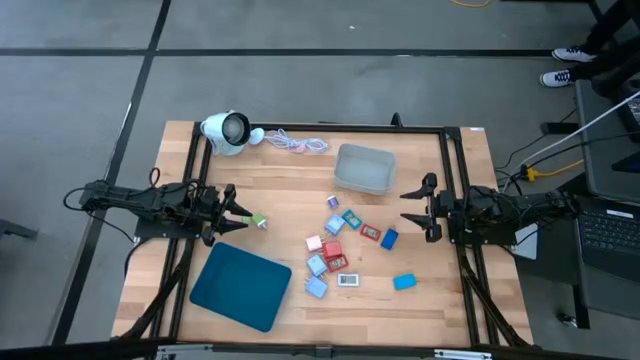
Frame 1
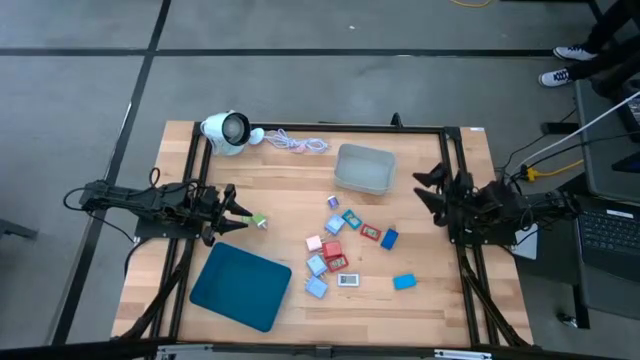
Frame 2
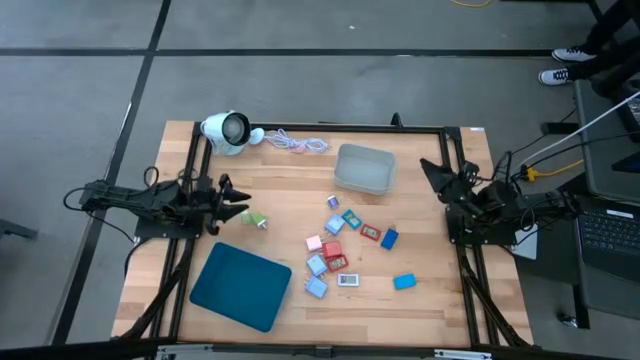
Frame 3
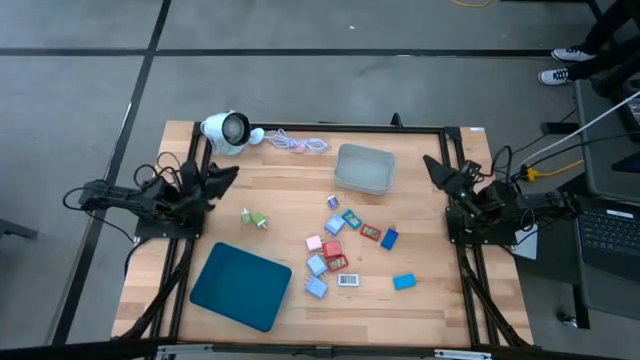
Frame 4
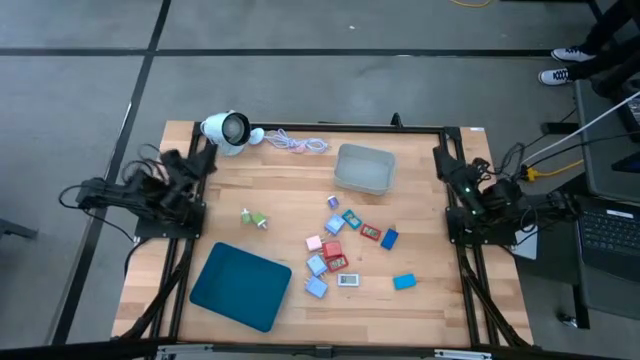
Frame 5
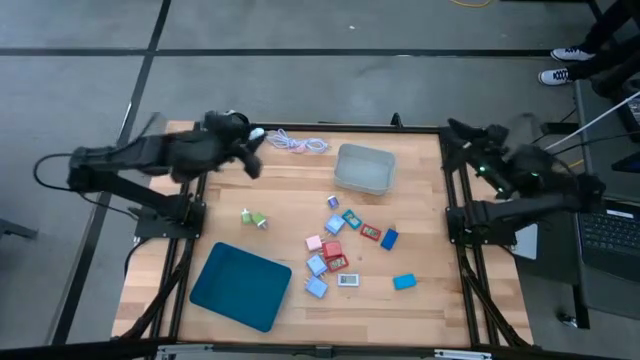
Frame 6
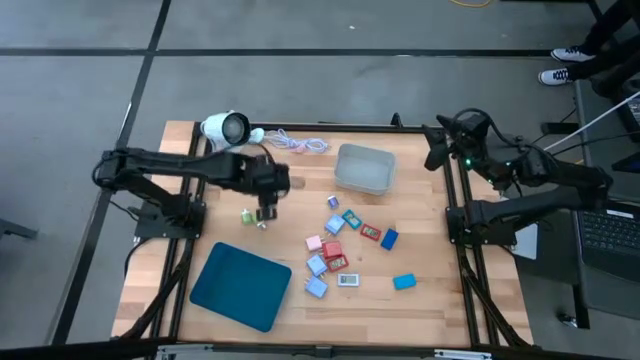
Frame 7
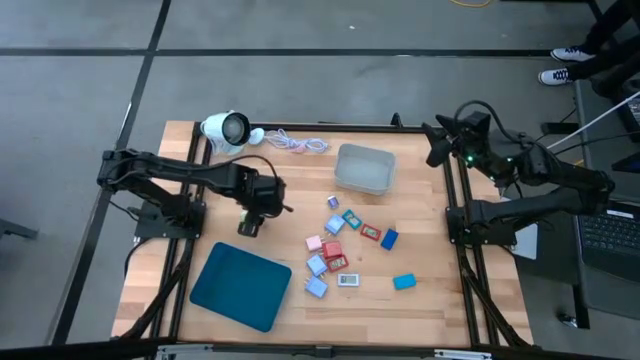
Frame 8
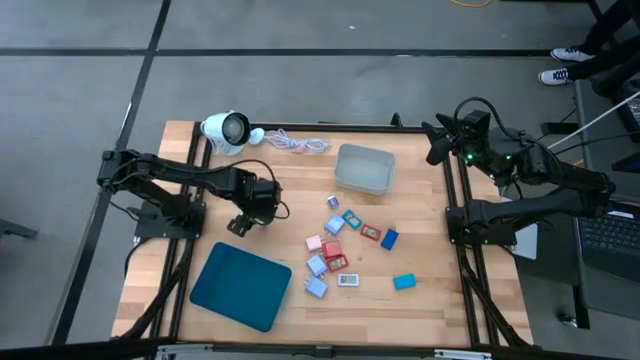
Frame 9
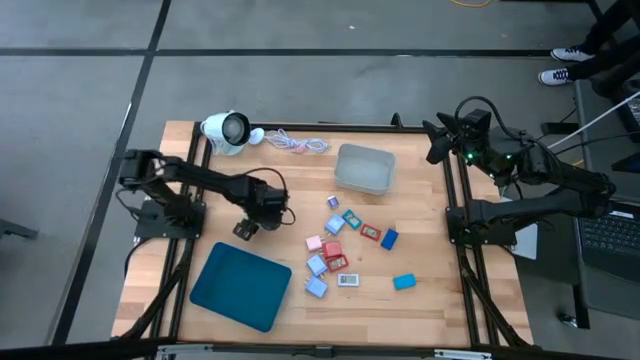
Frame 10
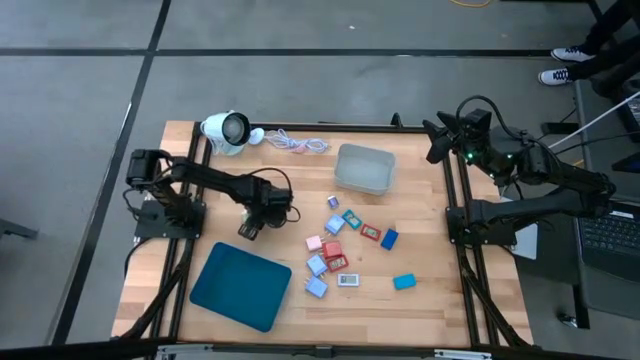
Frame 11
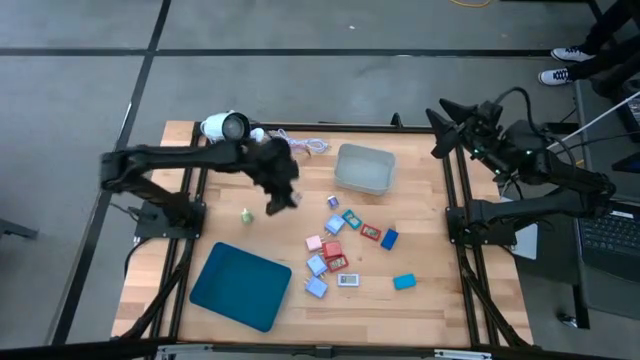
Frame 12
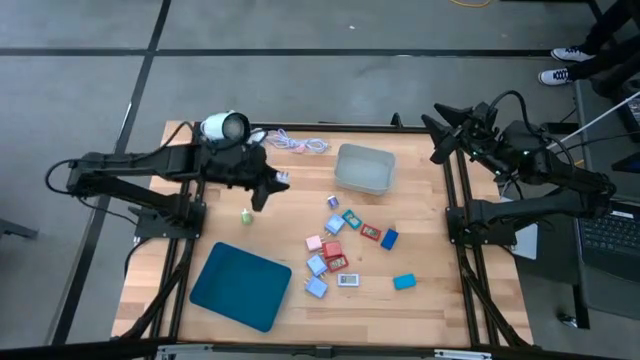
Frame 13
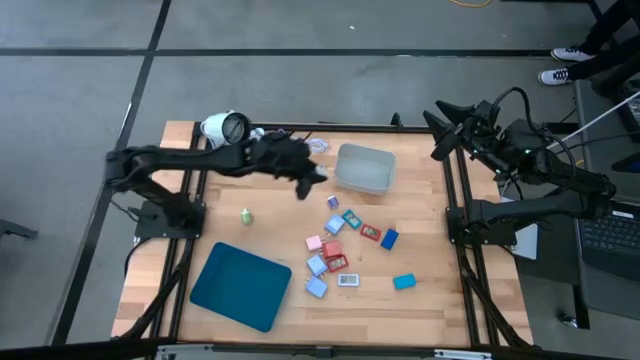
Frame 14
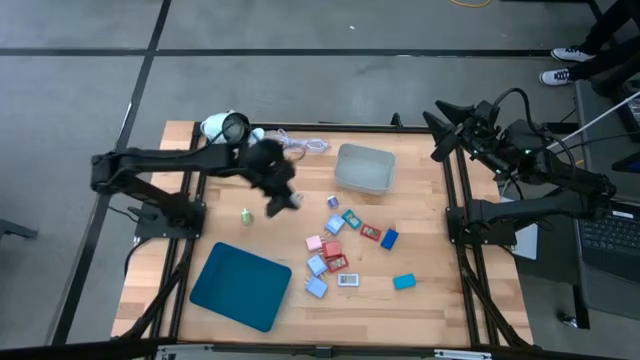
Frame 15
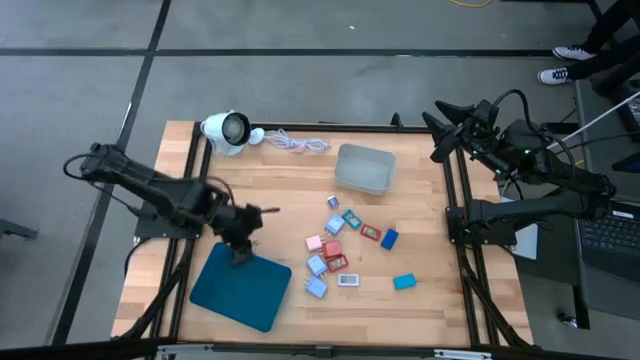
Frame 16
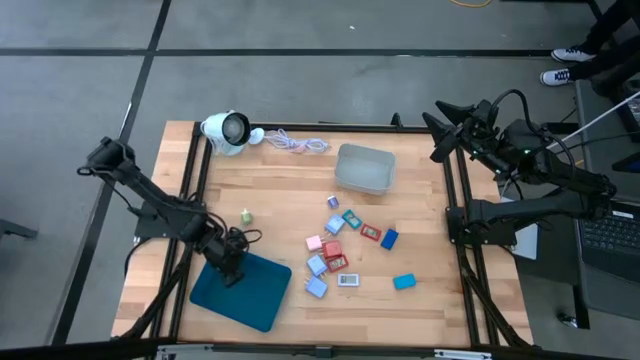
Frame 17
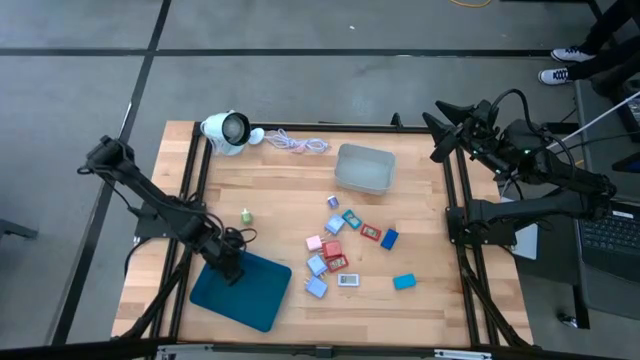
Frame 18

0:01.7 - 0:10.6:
Task: Pick & Place Office items
Put the right green charger adapter into the blue bin

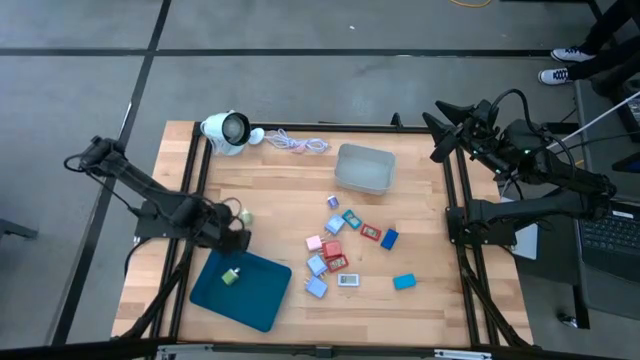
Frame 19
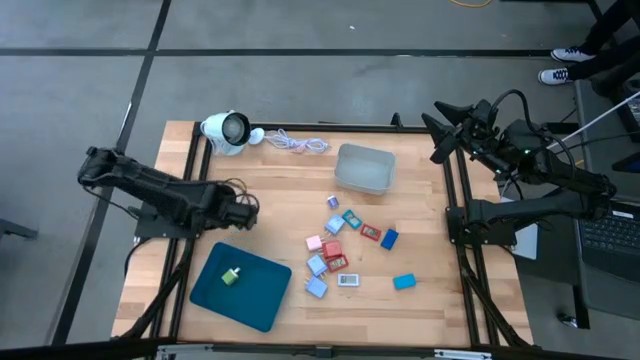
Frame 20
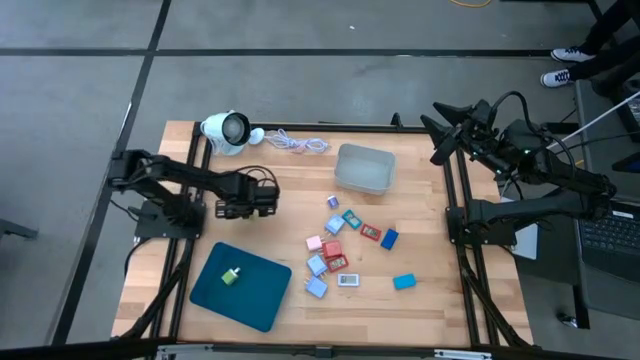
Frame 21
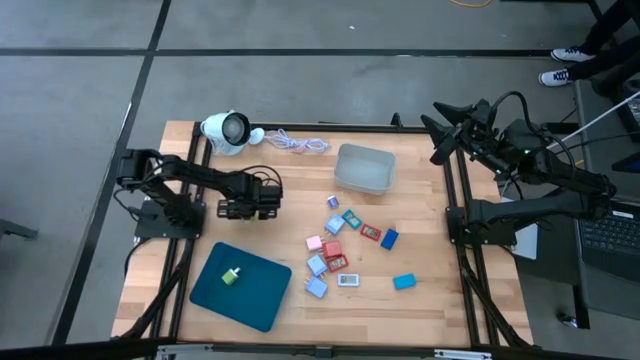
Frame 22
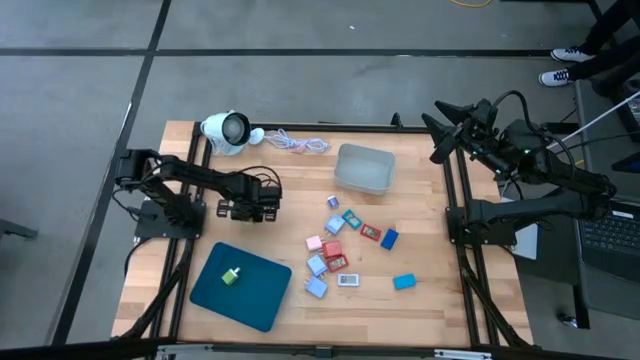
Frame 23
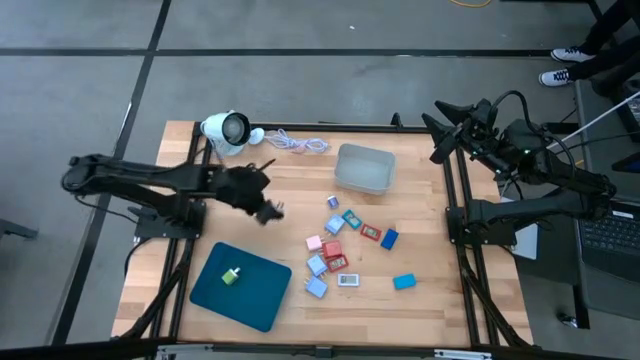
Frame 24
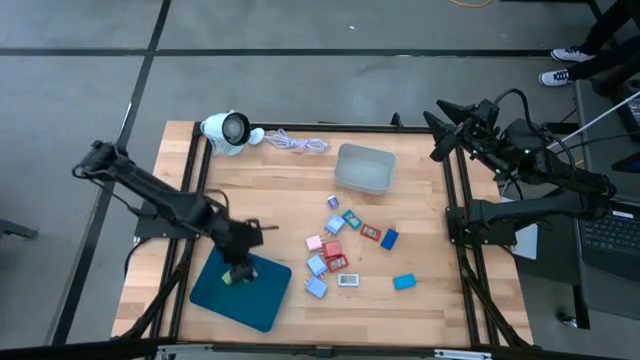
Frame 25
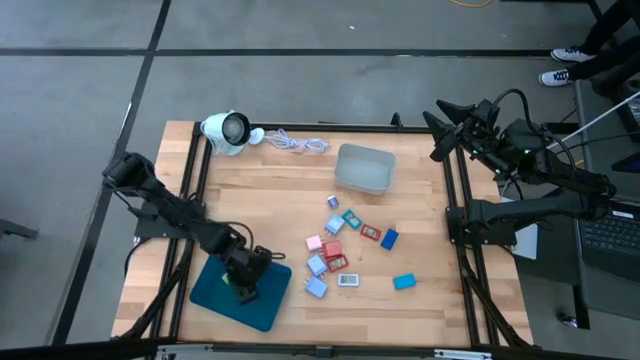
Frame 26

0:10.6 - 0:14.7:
Put the green charger adapter into the blue bin

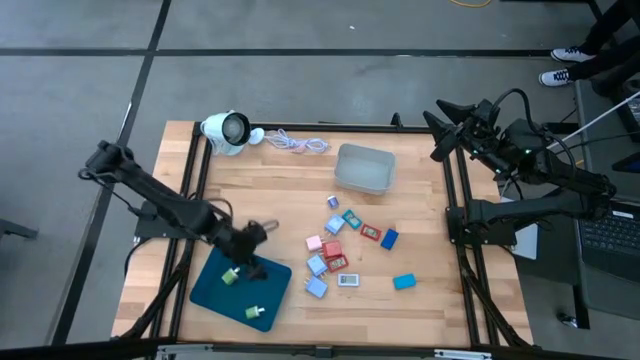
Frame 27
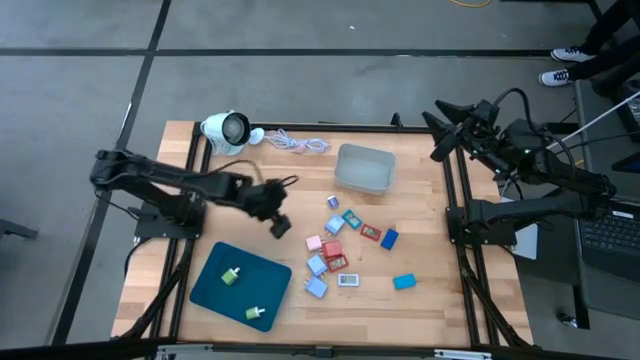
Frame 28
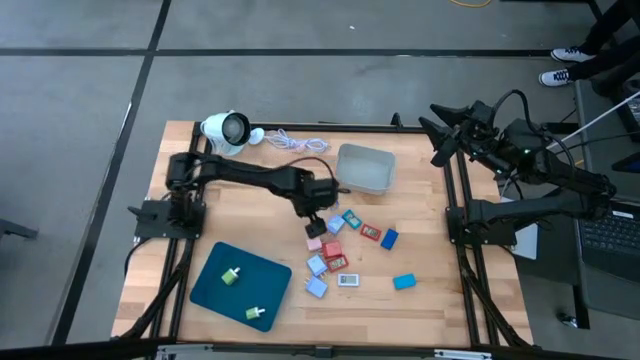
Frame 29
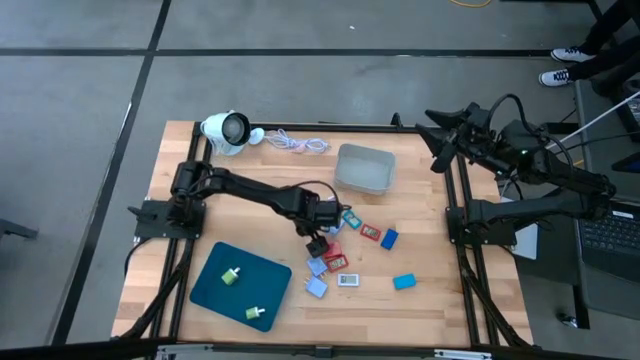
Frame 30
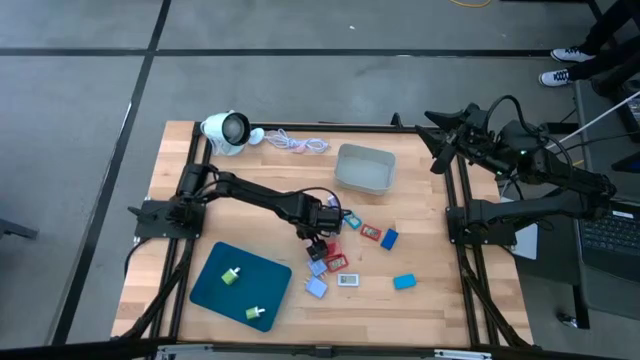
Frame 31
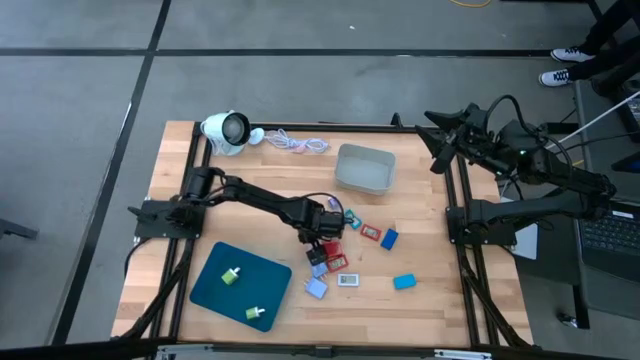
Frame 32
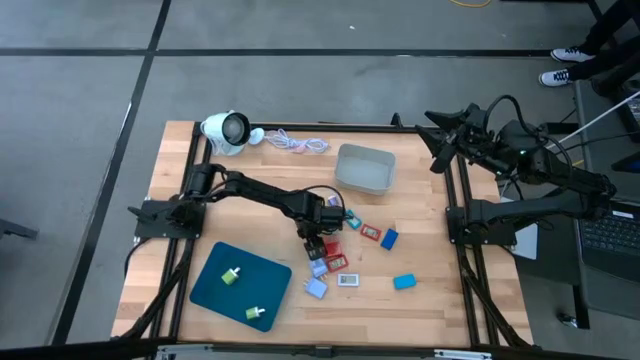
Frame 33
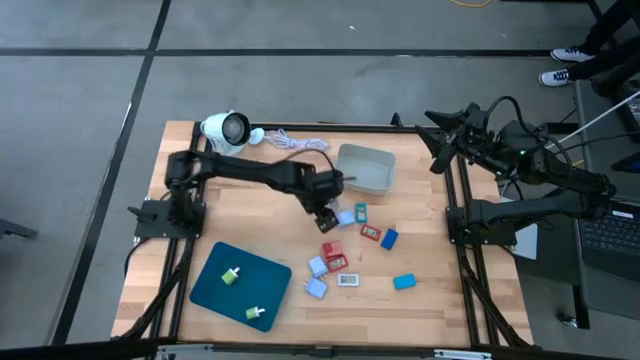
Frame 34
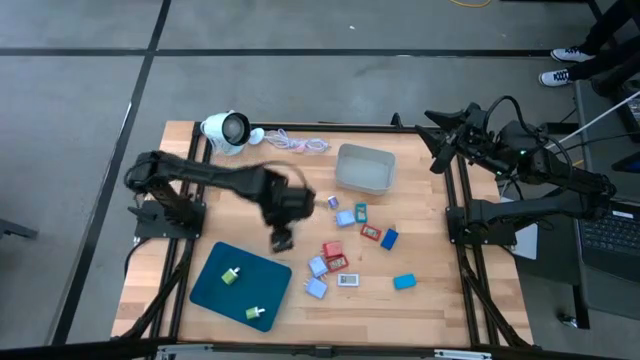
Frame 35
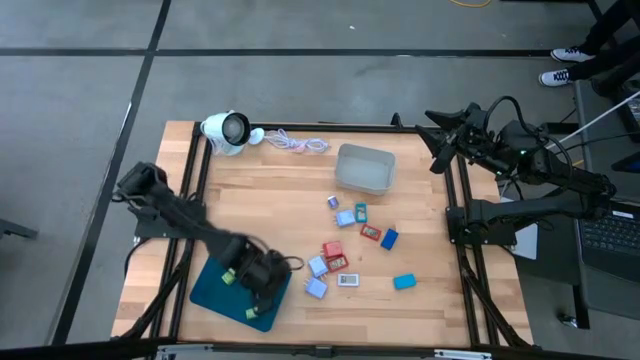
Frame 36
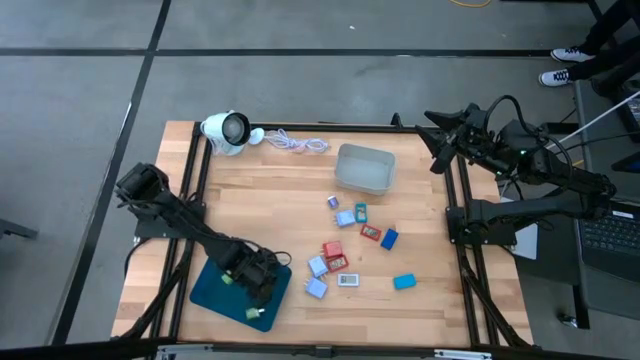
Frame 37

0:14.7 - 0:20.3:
Put the pink charger adapter into the blue bin

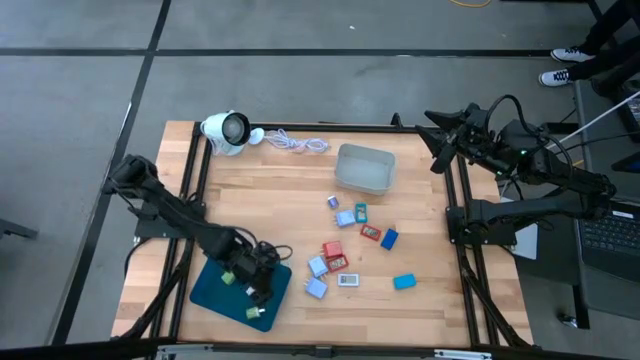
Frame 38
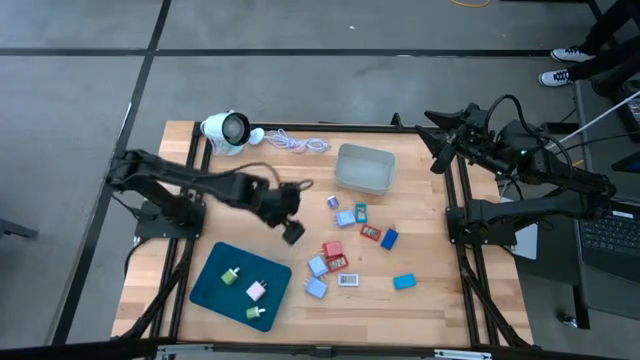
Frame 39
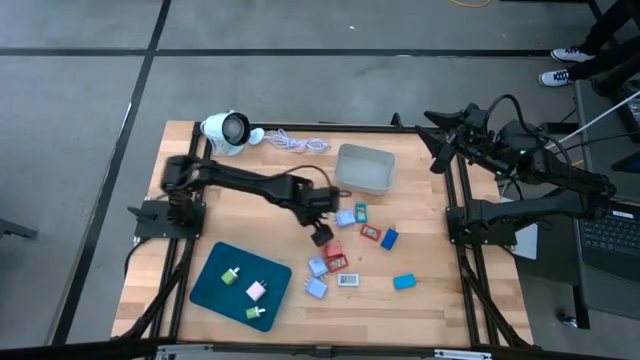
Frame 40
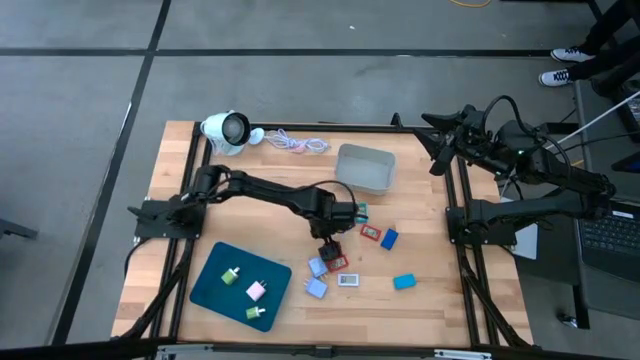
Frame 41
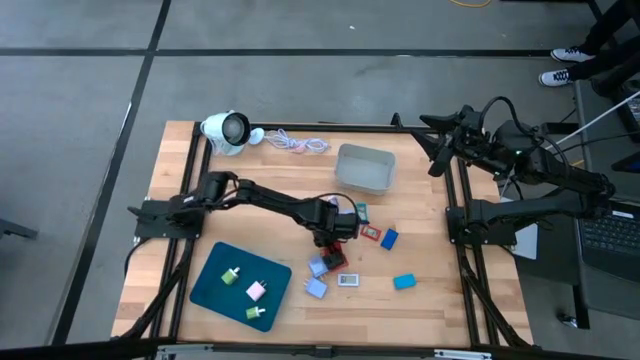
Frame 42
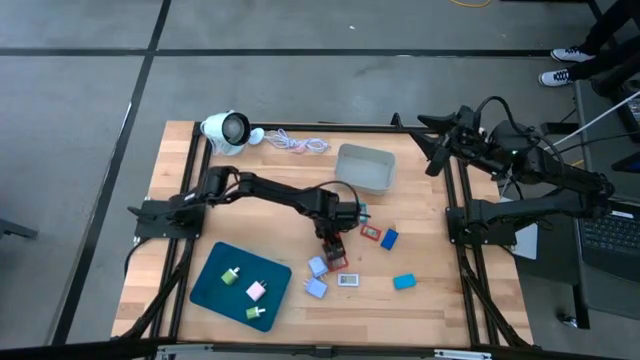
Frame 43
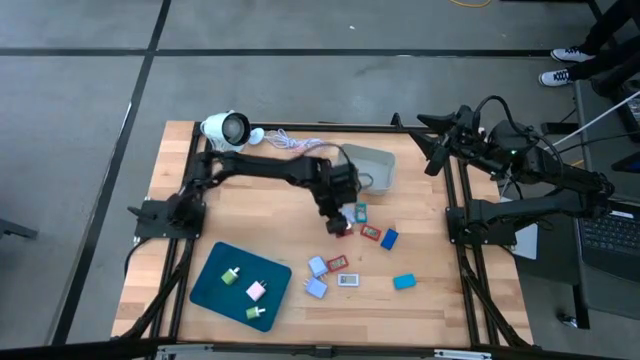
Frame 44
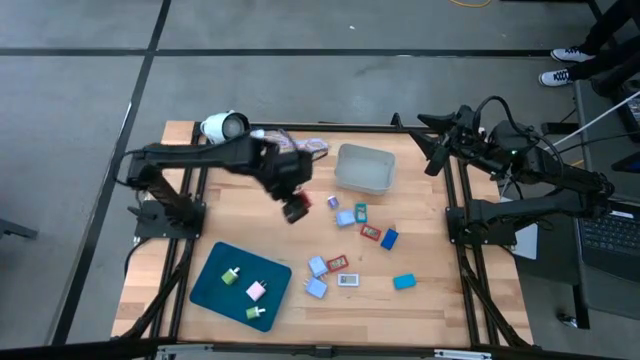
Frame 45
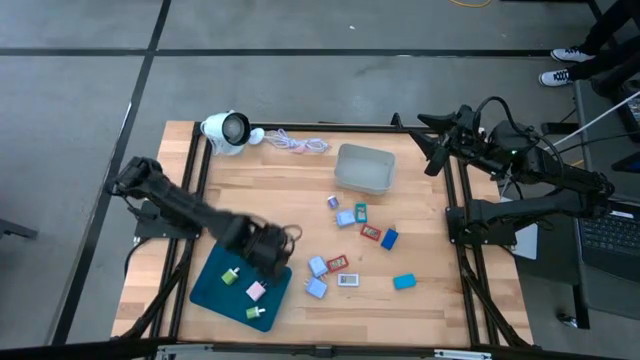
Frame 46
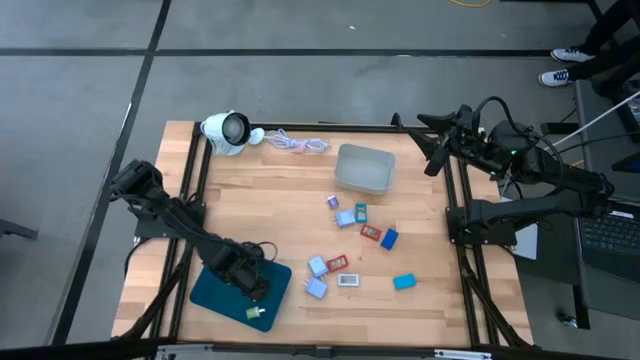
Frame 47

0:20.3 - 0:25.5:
Put the red charger adapter into the blue bin
